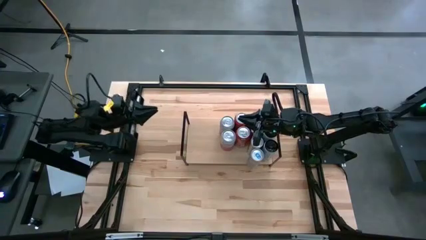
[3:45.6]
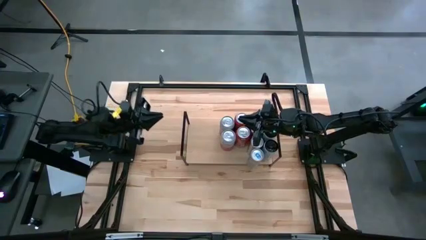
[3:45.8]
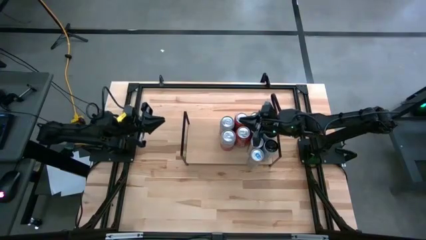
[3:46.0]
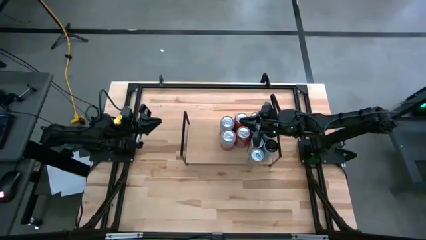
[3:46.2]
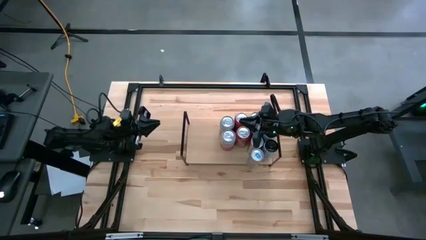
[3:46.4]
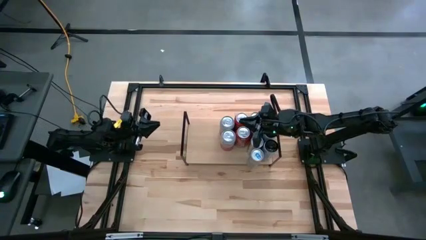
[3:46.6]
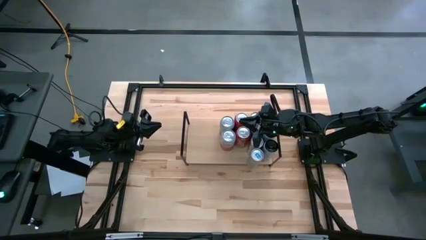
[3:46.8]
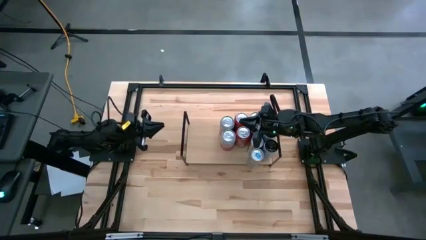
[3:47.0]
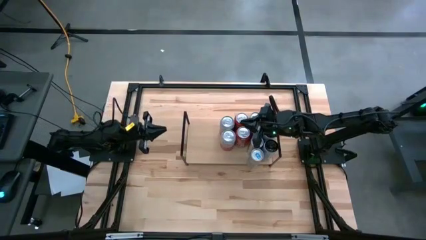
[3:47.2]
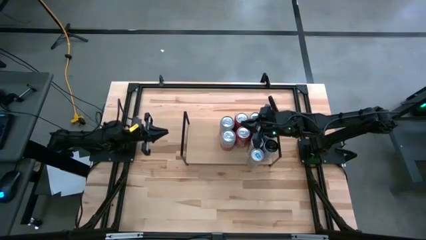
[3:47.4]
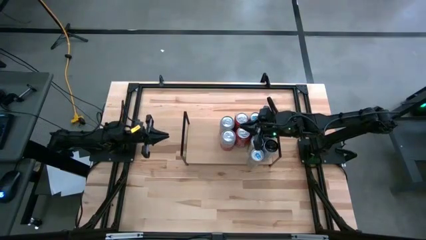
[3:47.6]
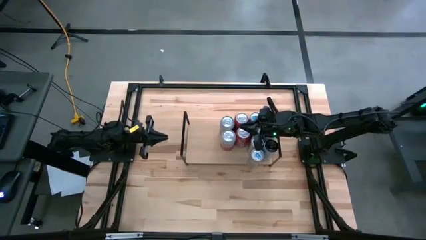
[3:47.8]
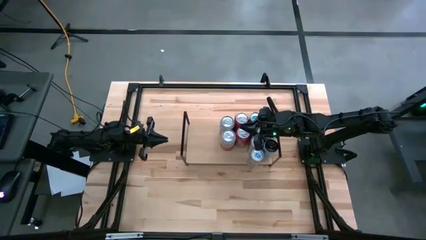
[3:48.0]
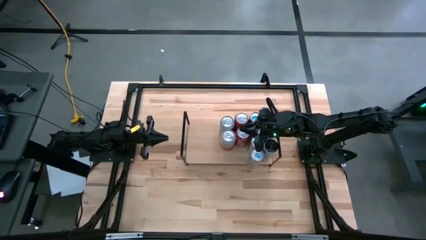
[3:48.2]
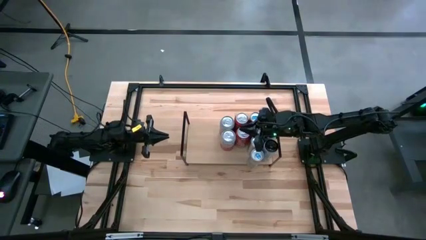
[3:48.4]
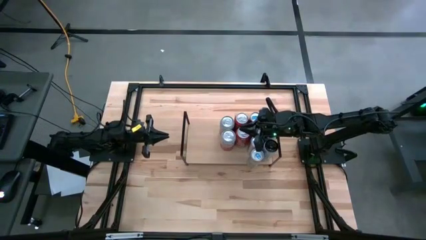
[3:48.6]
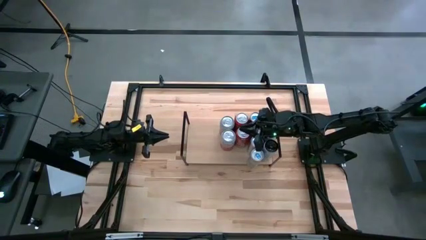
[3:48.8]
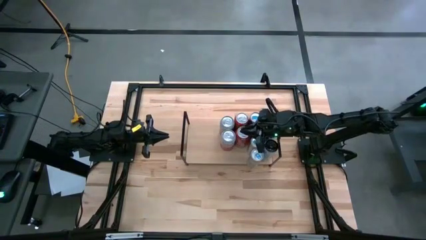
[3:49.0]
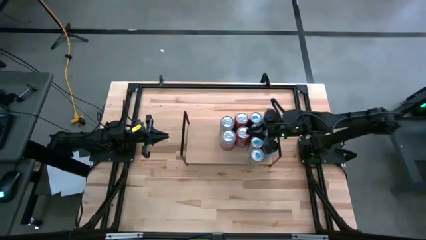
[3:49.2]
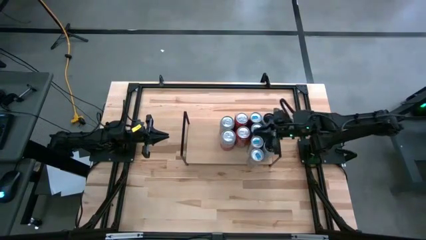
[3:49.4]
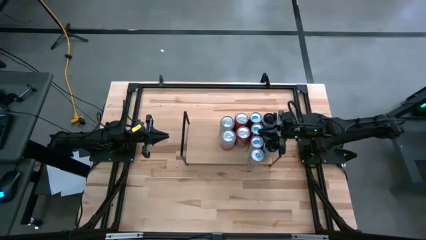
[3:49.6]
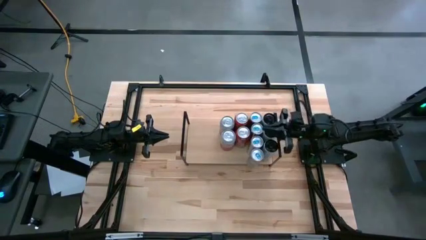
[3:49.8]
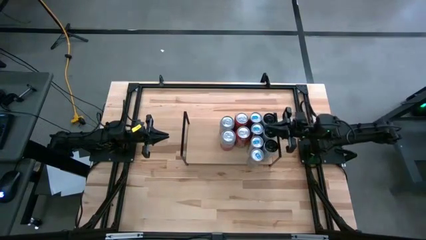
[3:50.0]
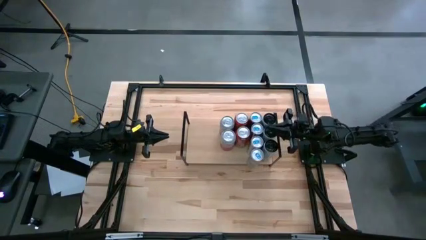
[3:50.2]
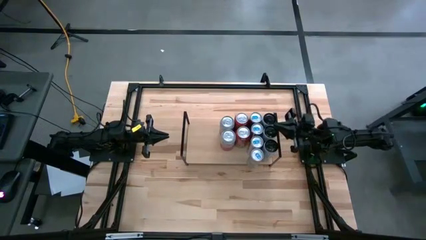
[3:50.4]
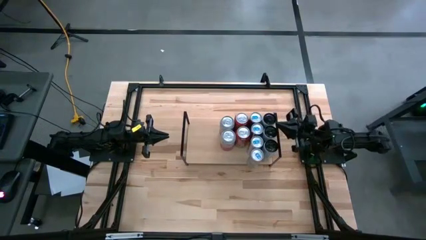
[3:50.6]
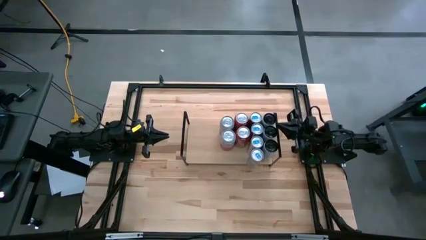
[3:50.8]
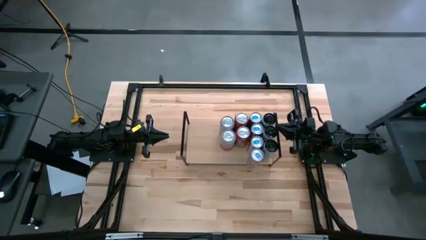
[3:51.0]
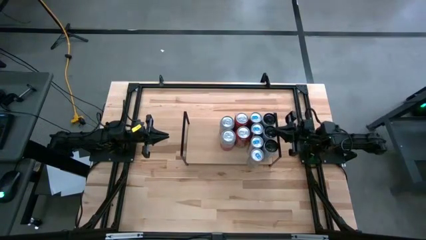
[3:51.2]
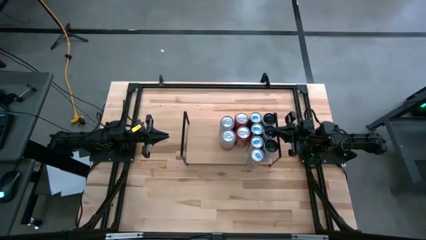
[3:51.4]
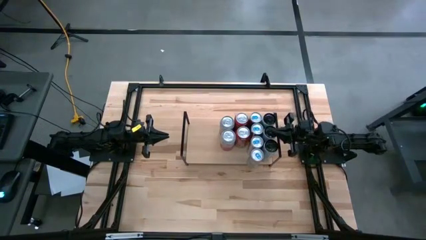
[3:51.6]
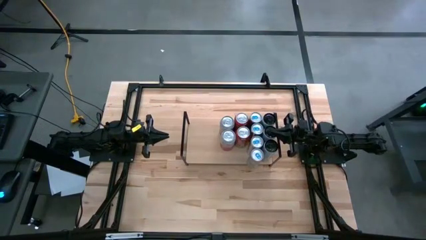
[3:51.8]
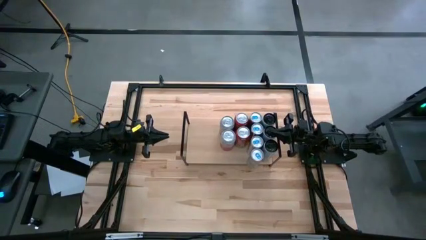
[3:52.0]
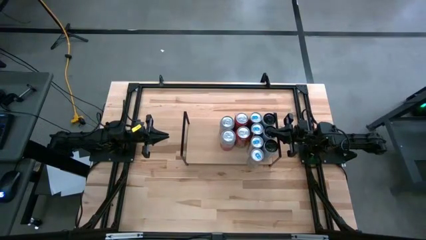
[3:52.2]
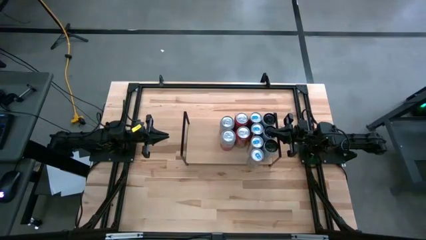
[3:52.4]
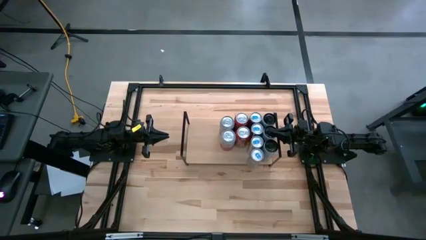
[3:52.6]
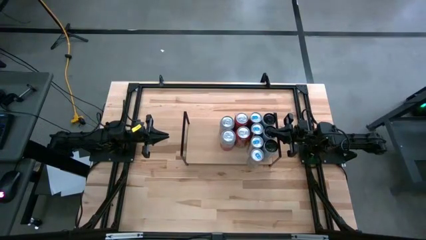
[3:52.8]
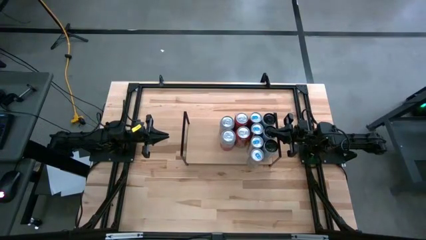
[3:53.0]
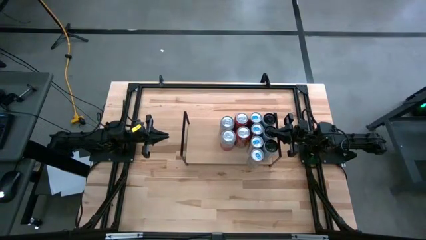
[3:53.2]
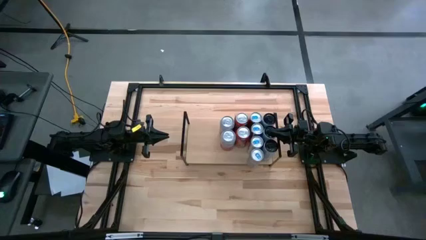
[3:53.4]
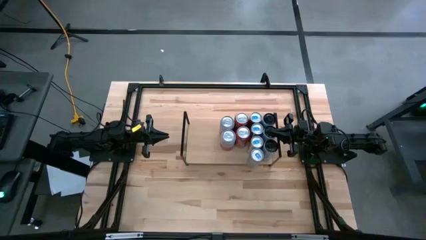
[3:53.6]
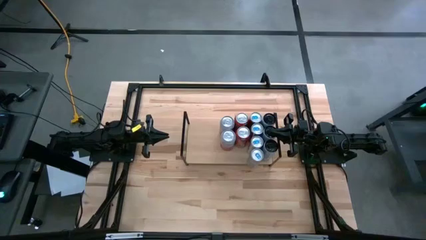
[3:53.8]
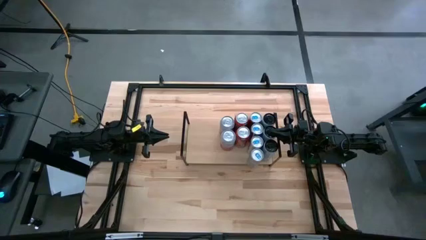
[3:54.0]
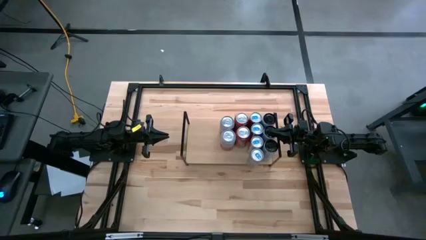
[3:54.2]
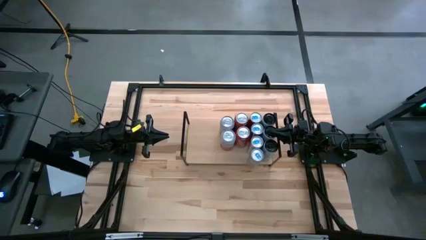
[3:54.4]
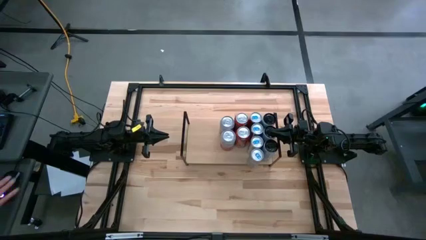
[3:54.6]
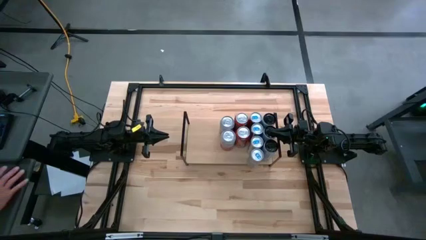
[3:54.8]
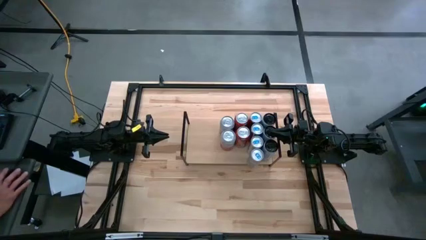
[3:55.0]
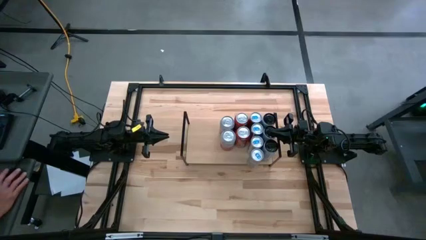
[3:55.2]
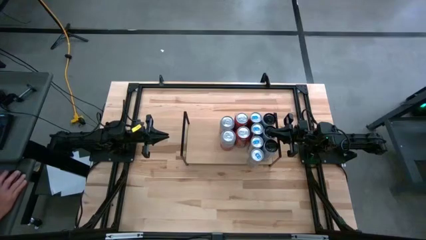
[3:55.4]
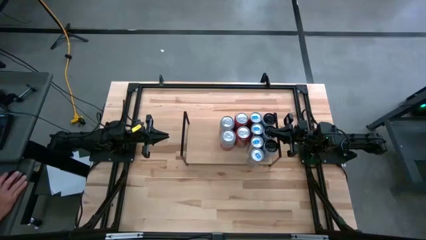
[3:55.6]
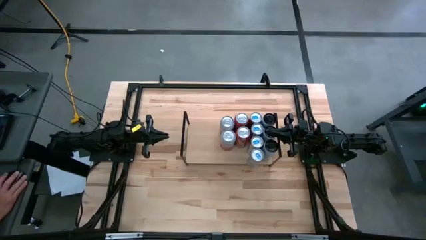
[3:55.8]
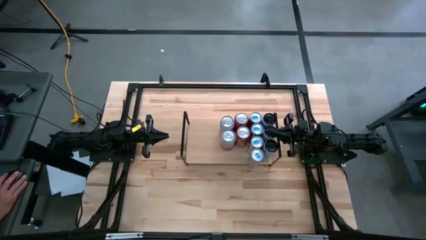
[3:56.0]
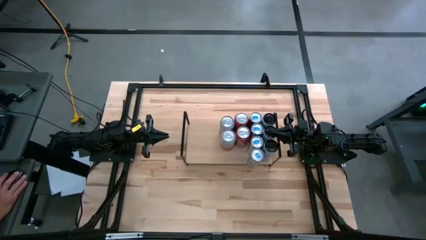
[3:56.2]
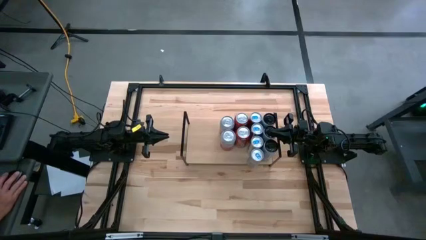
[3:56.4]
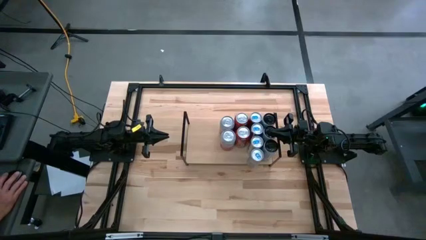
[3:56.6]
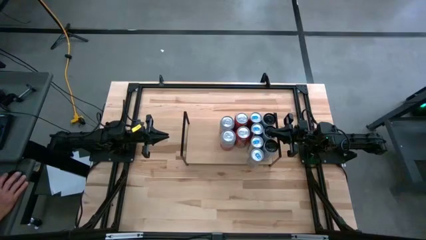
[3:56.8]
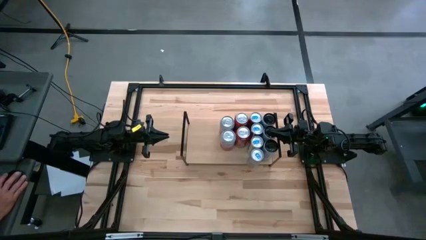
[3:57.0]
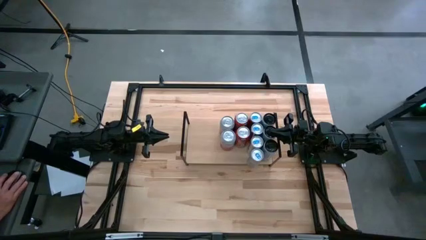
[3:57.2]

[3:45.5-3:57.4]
Task: Place canned beverage on shelf
Return to Home Position

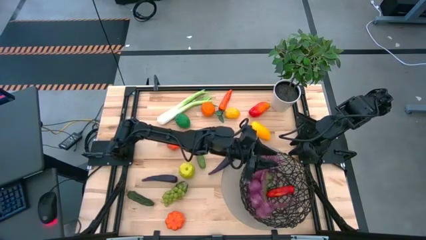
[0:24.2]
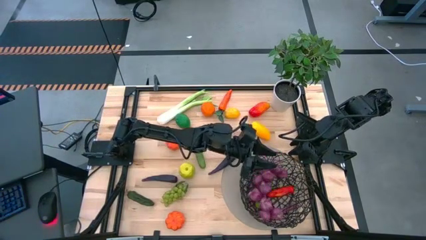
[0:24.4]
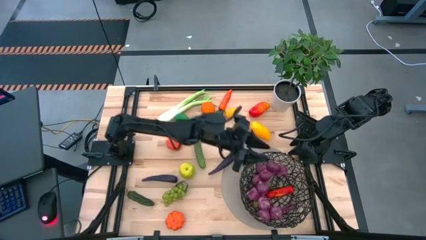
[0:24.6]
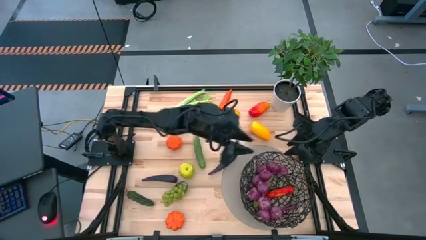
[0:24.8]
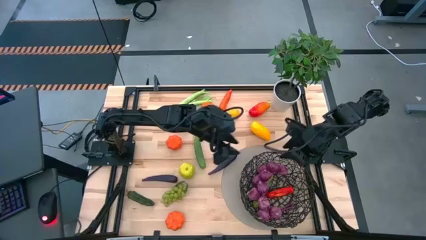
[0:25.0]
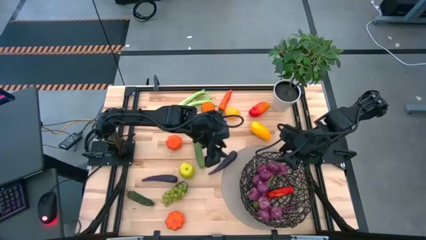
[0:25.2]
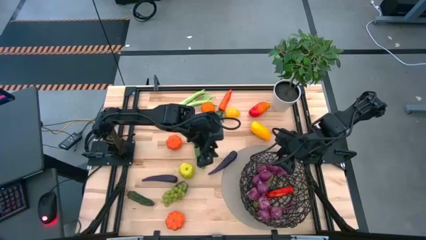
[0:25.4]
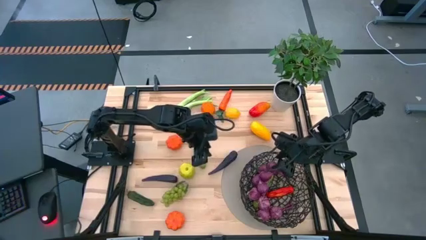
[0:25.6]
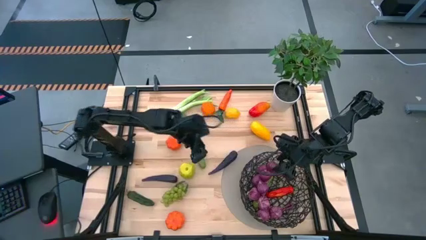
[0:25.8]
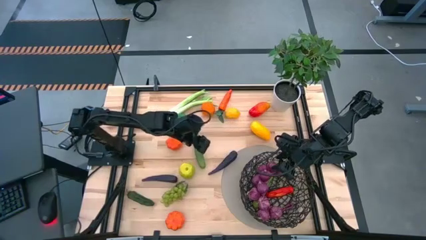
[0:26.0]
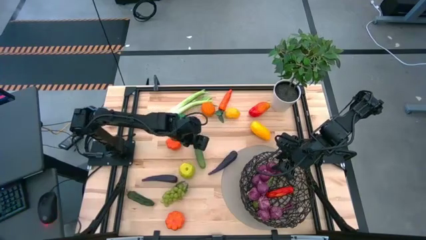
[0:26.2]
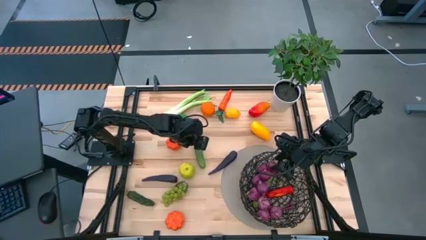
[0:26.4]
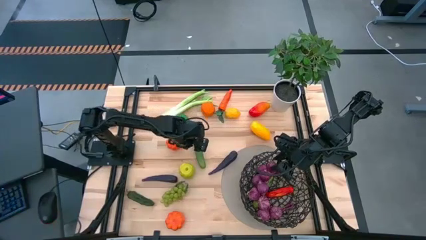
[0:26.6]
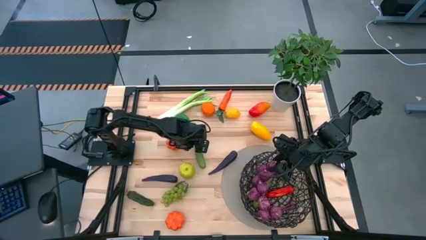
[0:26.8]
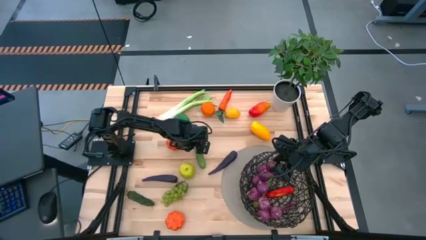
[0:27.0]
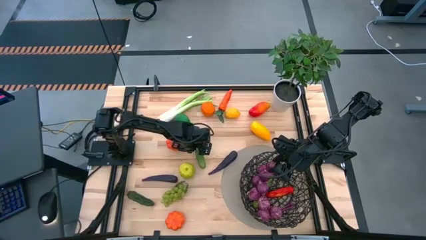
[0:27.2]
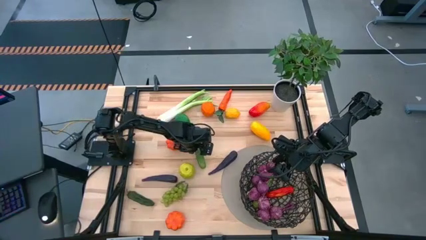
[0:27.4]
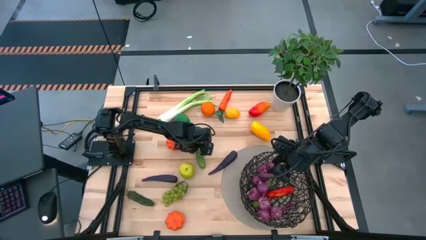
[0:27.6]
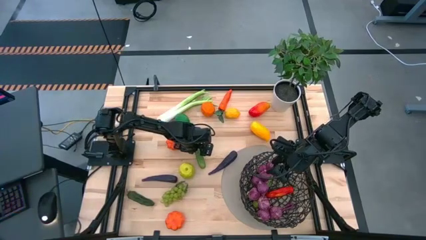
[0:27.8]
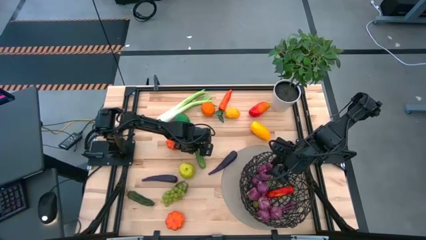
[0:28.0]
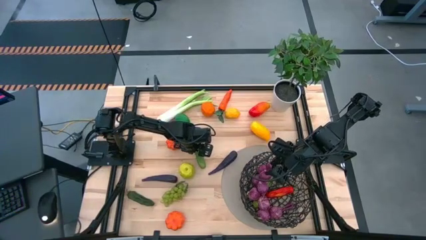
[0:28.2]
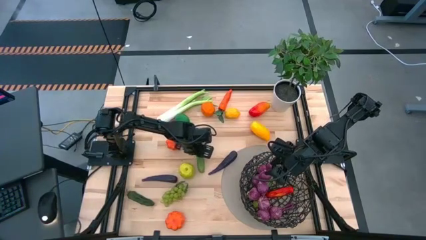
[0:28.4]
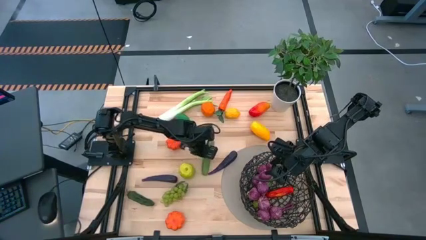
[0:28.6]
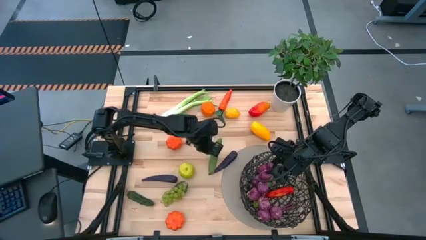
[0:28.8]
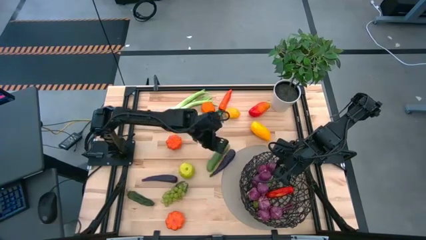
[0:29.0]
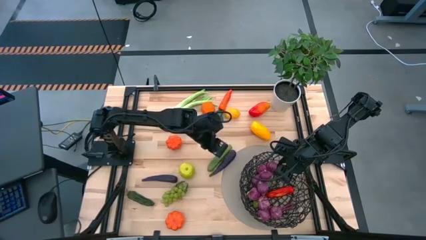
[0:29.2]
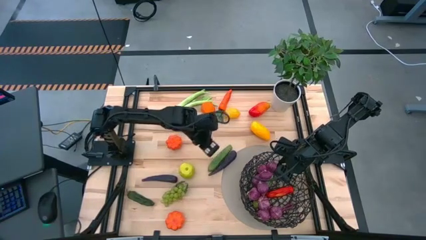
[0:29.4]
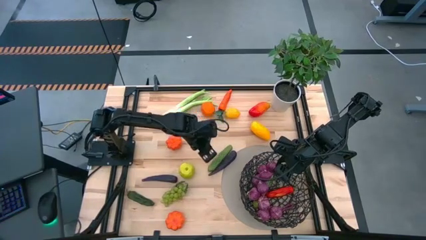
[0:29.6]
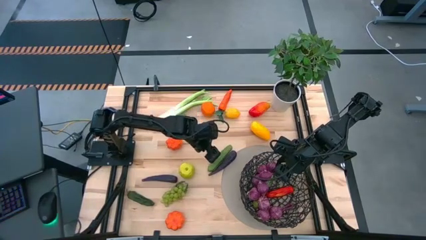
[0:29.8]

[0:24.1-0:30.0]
Task: Build produce basket
Put the green cucumber into the black basket
